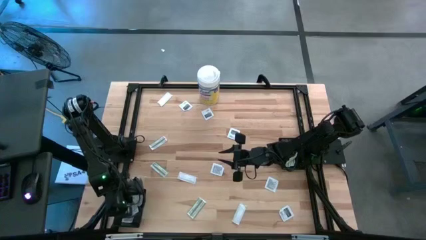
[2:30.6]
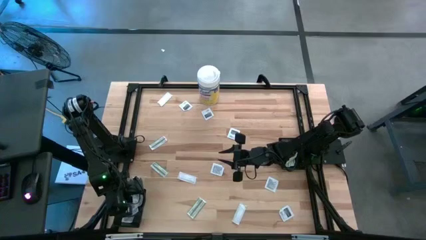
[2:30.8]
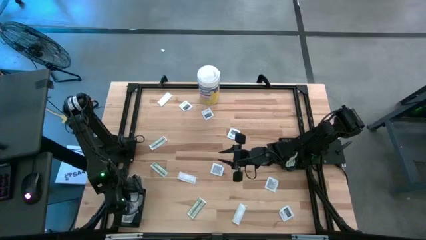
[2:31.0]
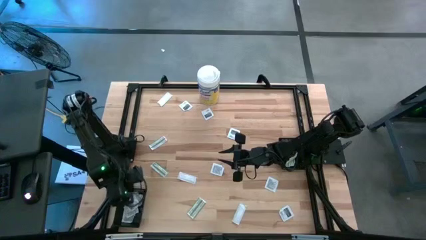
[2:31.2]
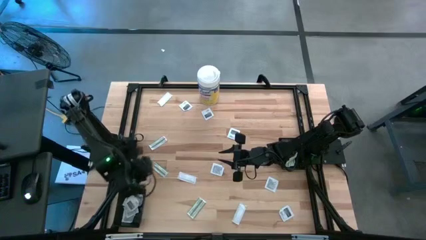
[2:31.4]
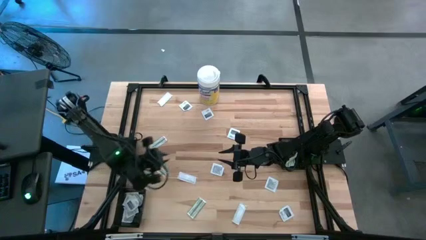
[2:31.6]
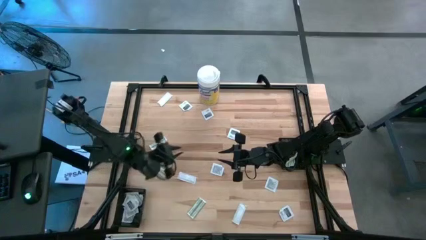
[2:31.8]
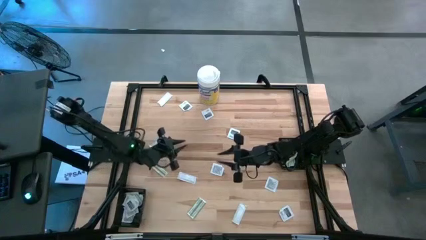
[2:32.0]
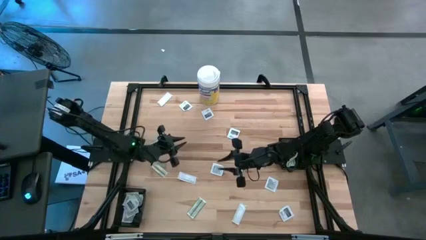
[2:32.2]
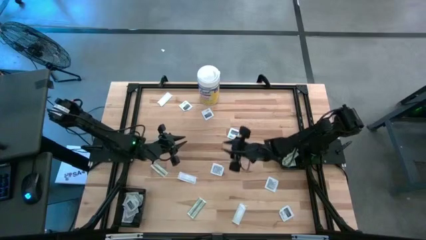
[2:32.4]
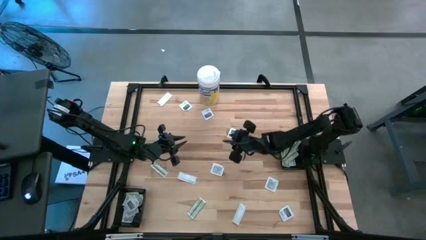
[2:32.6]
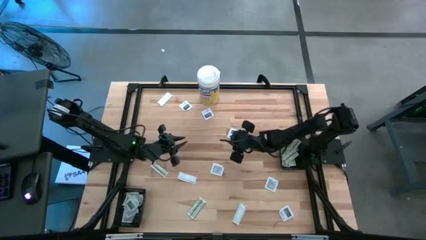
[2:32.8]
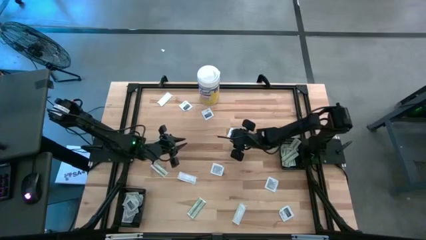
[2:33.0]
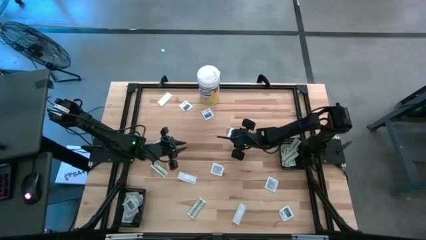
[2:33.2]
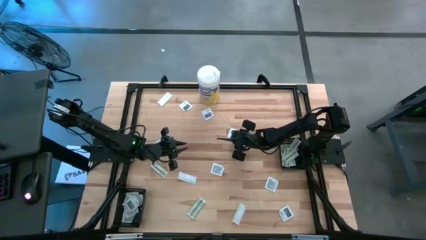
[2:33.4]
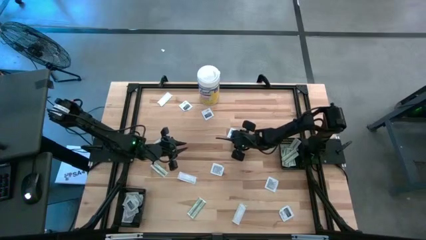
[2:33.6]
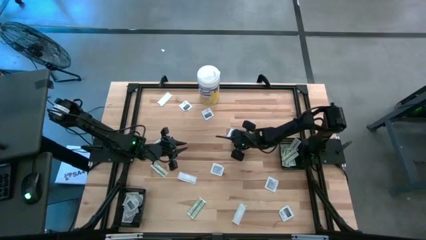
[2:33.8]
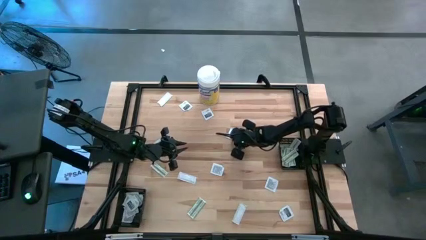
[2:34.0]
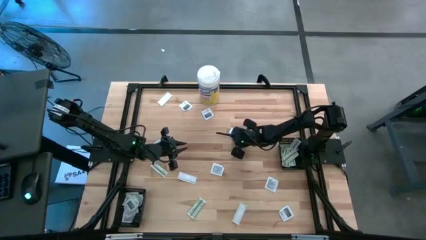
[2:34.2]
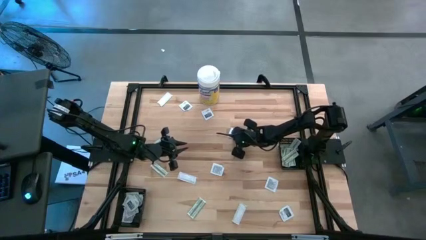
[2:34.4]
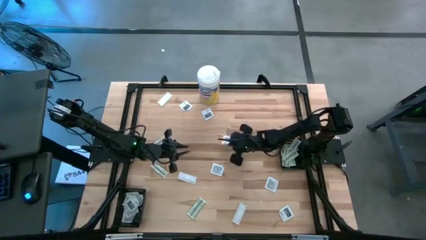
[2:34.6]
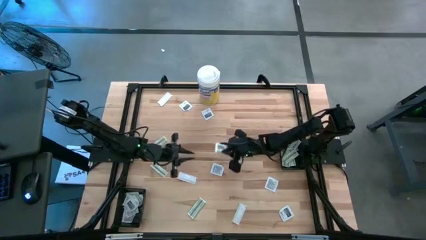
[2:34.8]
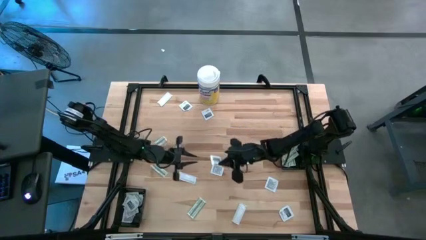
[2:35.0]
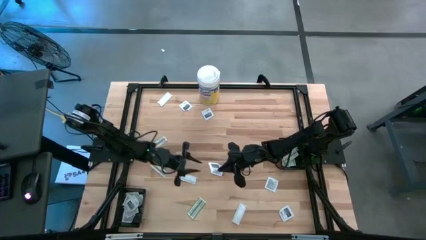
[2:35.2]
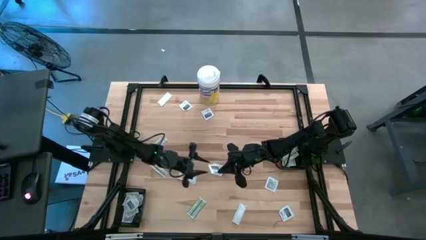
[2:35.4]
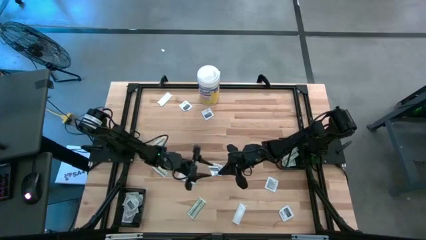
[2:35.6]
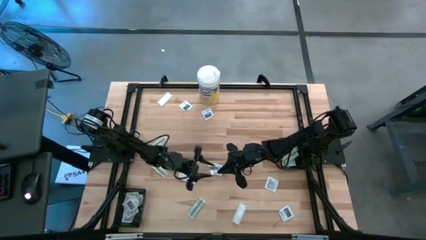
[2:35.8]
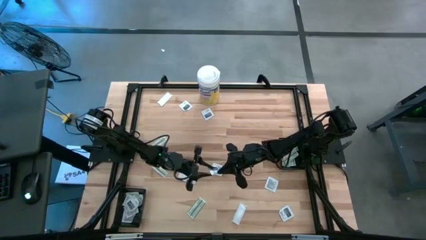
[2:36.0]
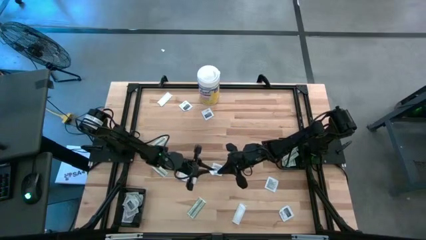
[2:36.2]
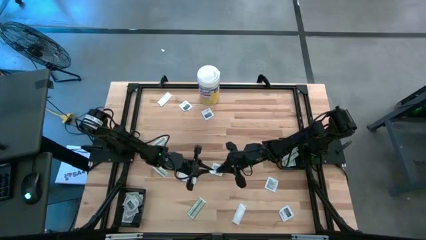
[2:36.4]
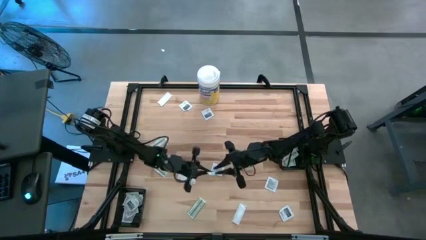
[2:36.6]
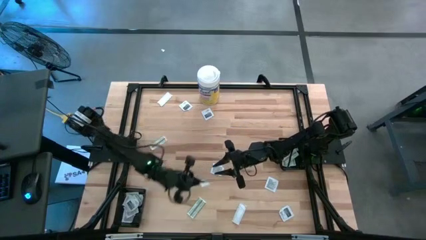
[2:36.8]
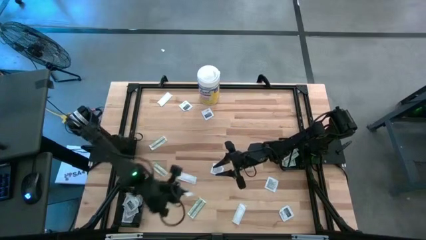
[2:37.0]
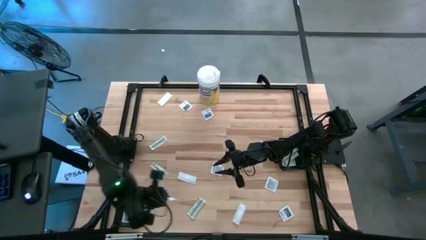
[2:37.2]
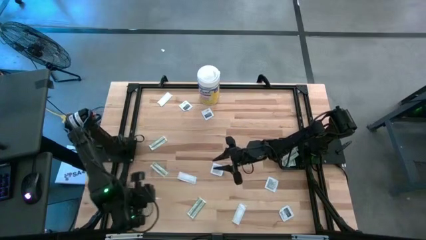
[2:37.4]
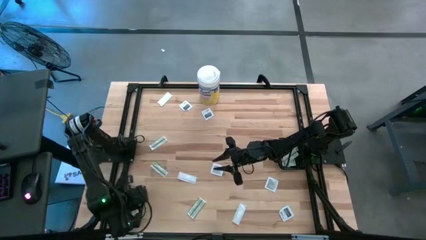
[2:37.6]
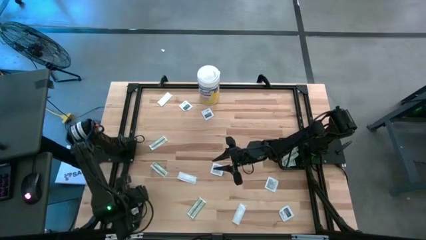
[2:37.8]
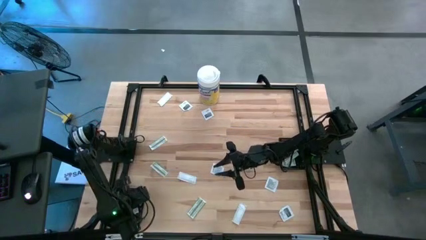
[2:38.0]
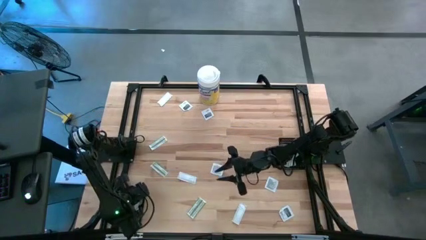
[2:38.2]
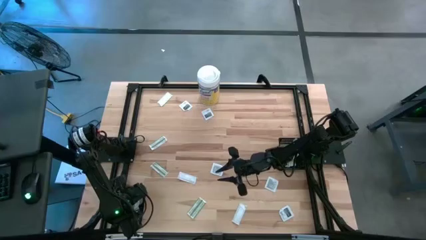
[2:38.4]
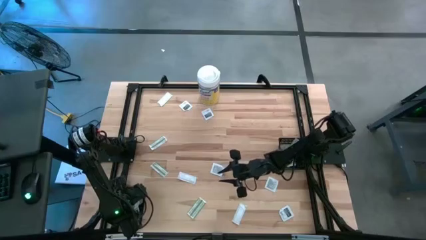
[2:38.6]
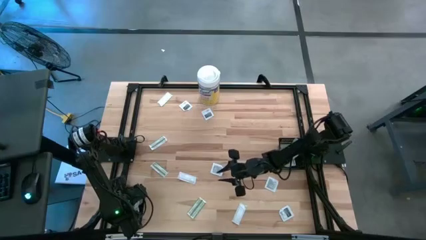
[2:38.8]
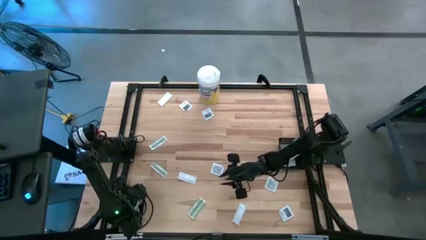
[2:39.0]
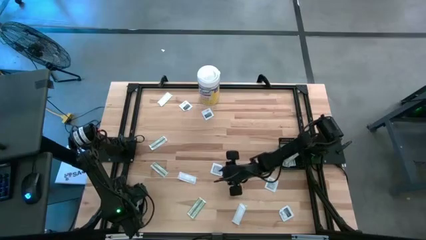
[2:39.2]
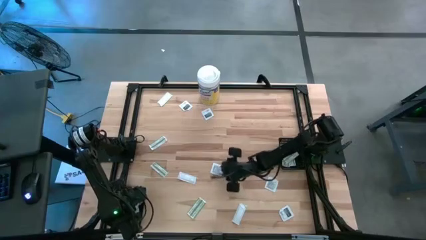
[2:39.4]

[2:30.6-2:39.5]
Task: Pick & Place First Aid Supplies
Put the white towelette sachet into the left black bin

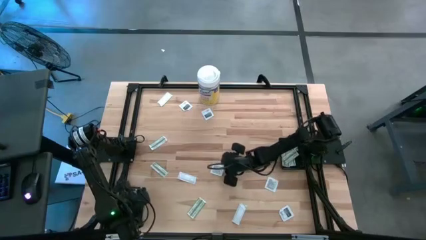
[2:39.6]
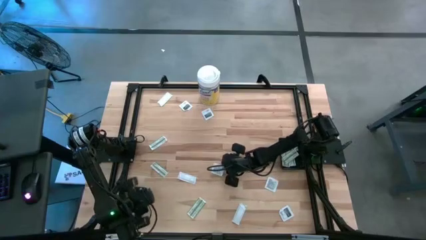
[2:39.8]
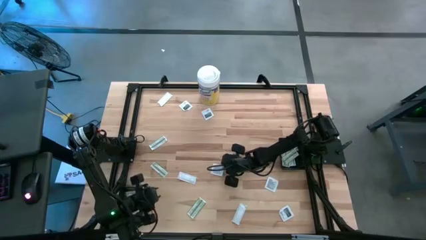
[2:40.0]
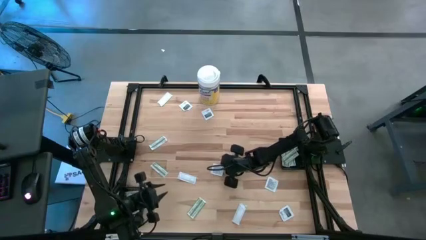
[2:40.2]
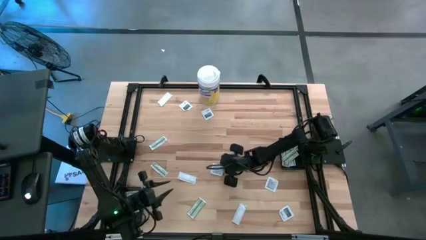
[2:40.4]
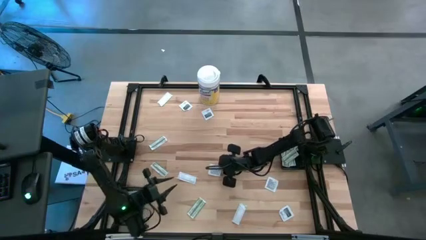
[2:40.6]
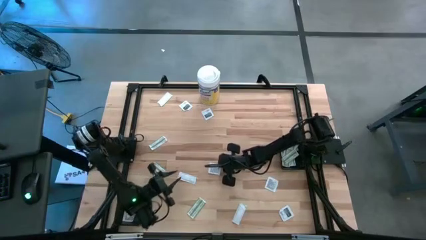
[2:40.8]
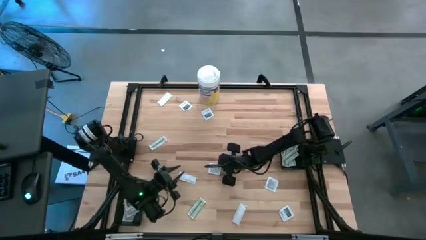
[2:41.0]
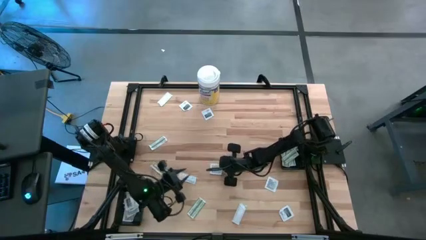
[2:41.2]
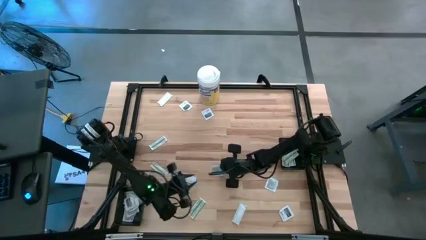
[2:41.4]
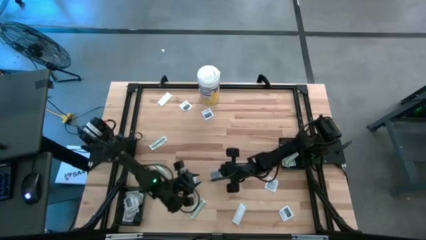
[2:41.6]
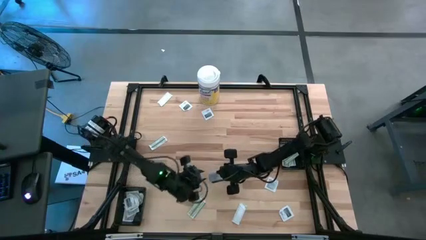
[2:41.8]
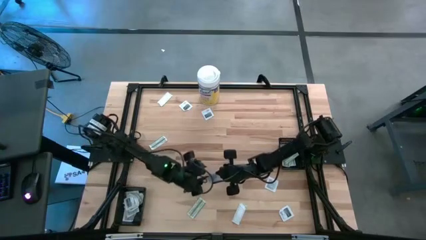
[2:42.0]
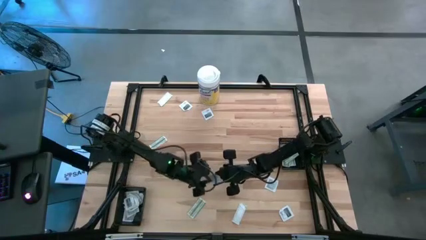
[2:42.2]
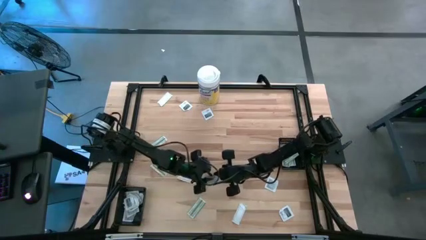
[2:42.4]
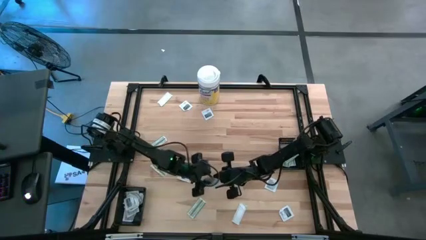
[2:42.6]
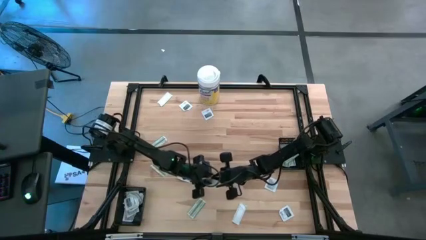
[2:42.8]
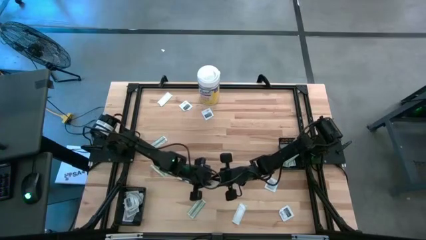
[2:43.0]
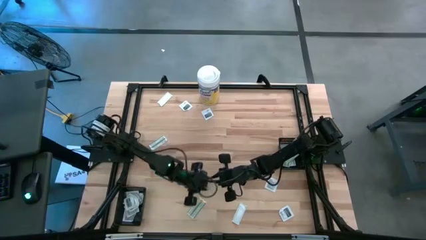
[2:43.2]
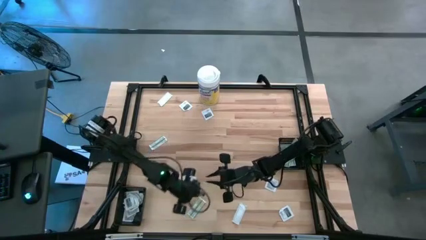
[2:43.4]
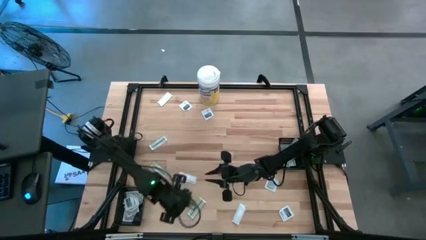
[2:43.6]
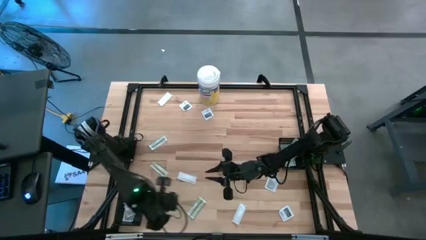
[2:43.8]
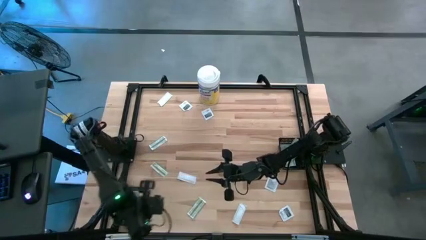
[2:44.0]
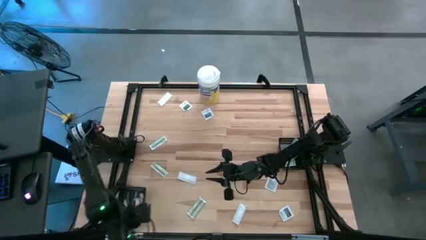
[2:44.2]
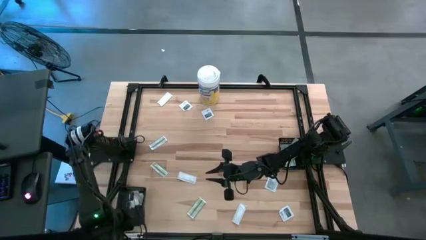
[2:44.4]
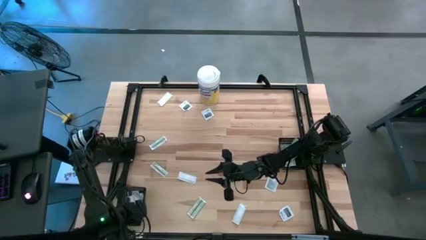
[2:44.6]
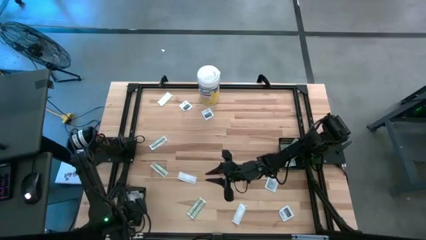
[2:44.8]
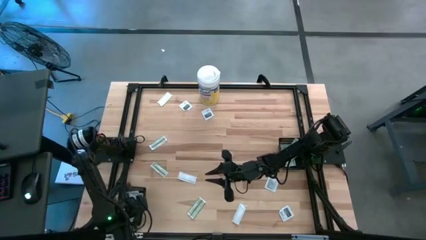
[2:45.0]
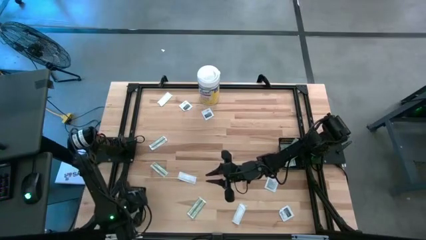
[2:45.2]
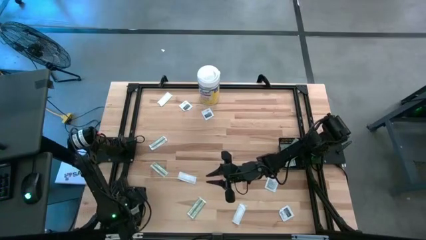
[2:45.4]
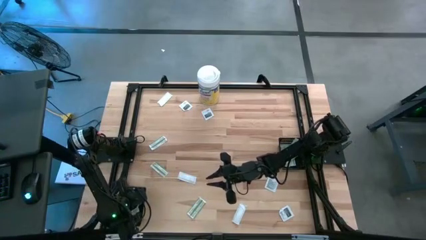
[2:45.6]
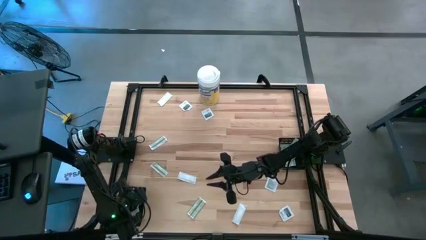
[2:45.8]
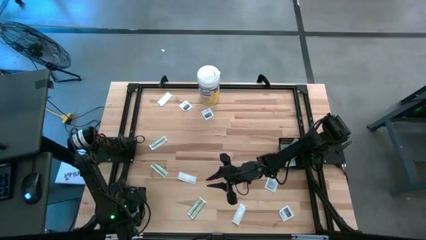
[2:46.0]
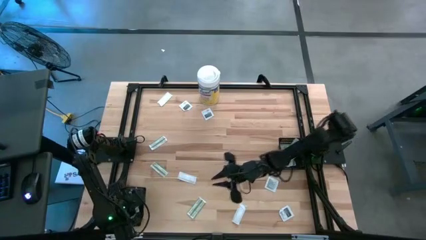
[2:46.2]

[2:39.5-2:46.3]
Put the white towelette sachet into the left black bin
